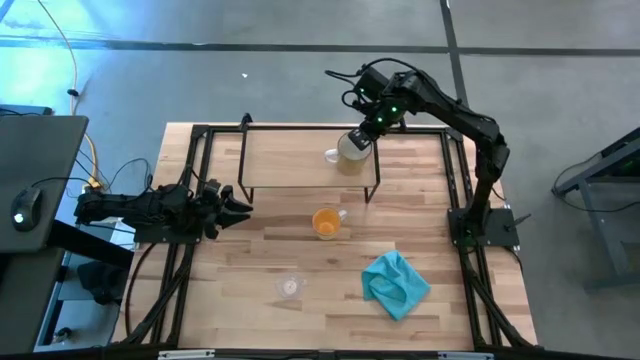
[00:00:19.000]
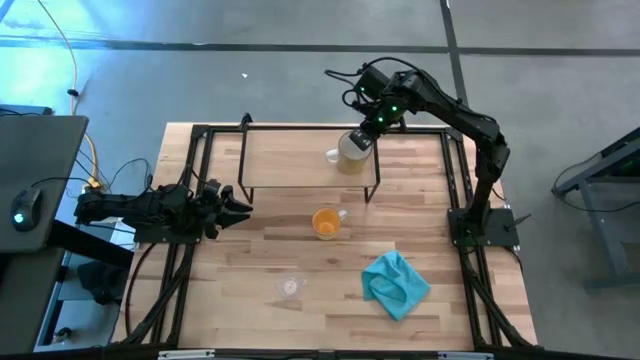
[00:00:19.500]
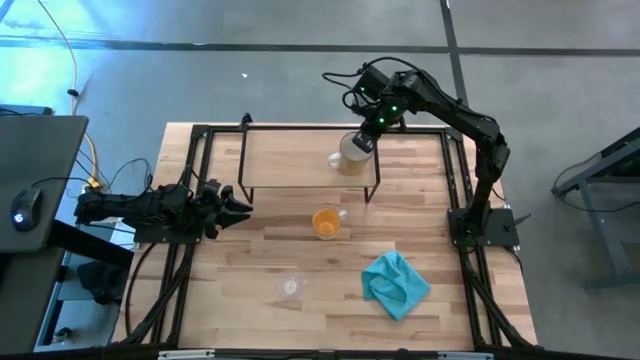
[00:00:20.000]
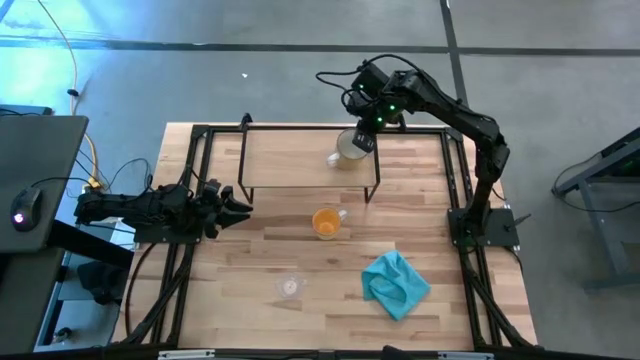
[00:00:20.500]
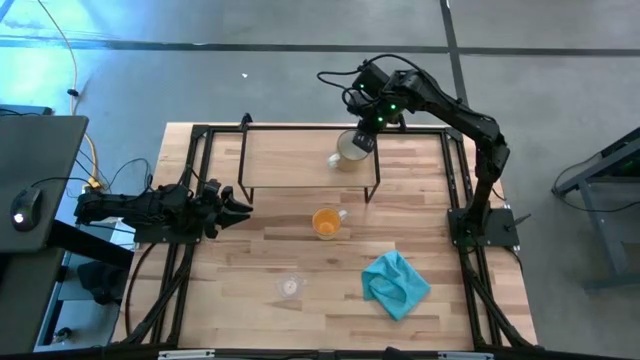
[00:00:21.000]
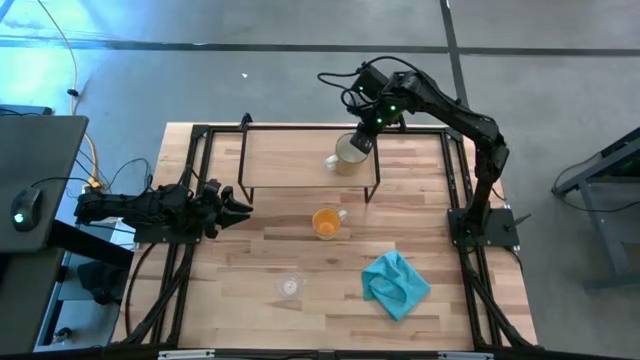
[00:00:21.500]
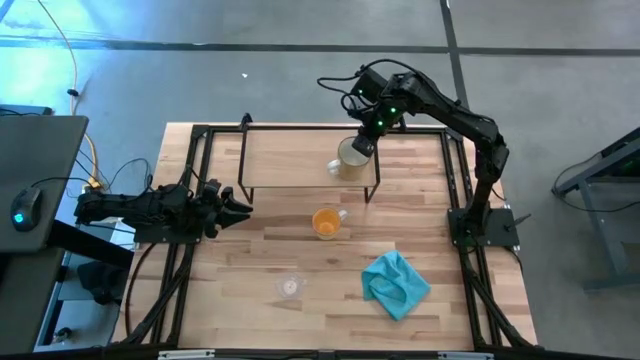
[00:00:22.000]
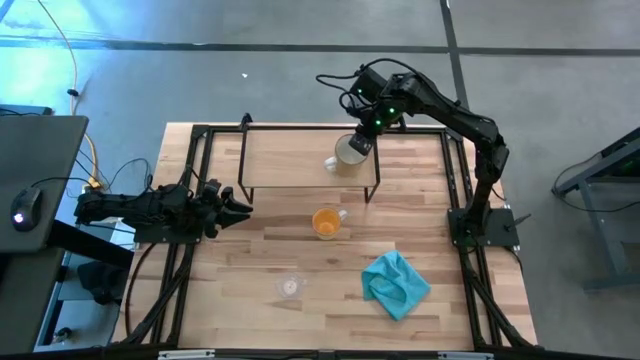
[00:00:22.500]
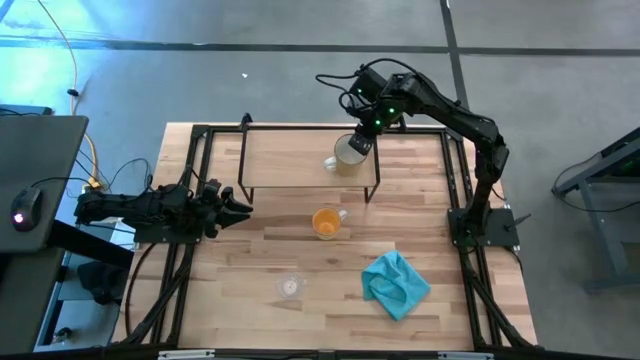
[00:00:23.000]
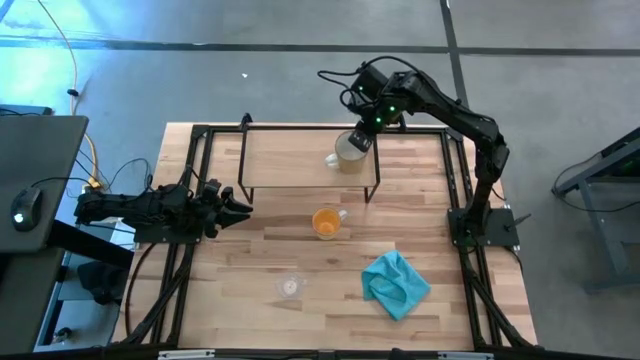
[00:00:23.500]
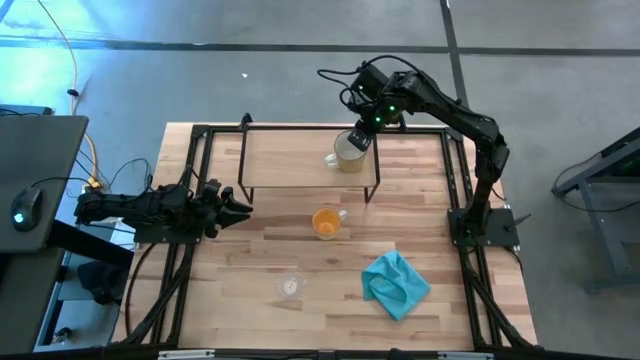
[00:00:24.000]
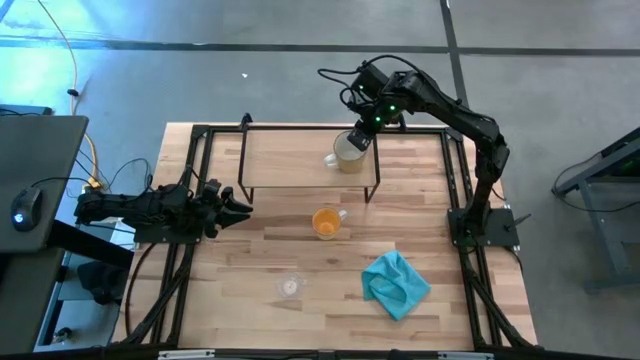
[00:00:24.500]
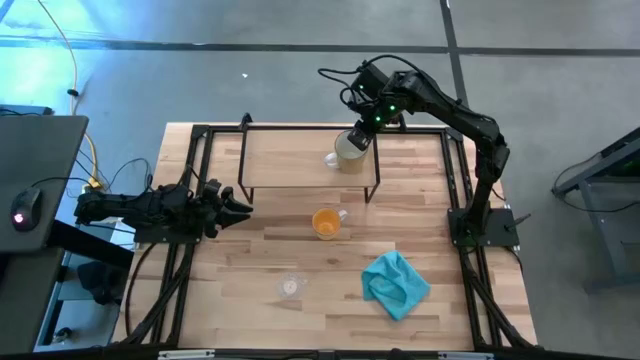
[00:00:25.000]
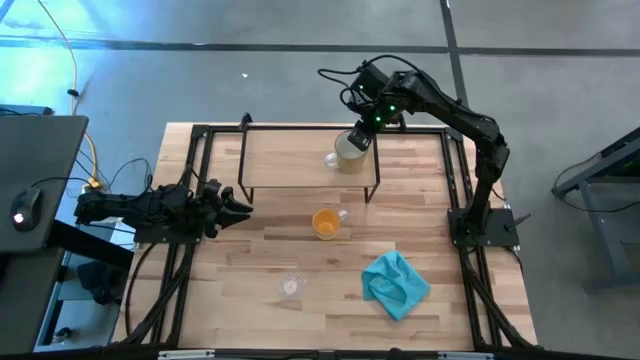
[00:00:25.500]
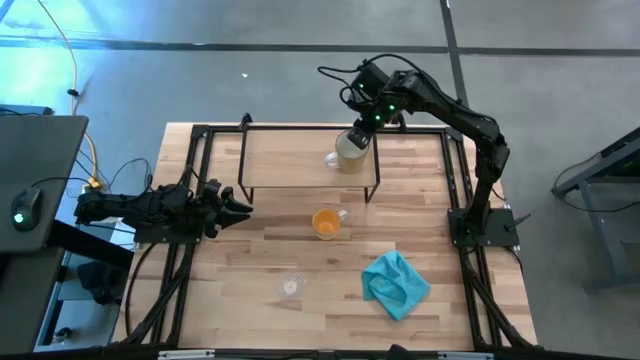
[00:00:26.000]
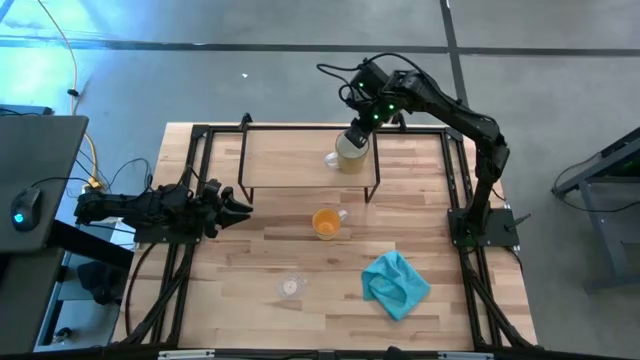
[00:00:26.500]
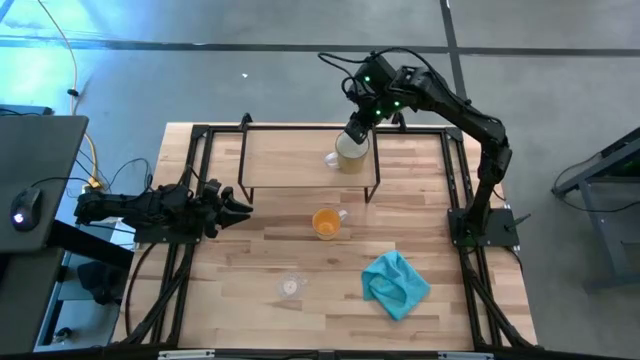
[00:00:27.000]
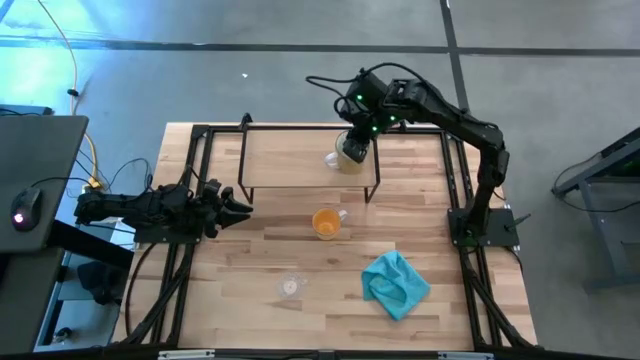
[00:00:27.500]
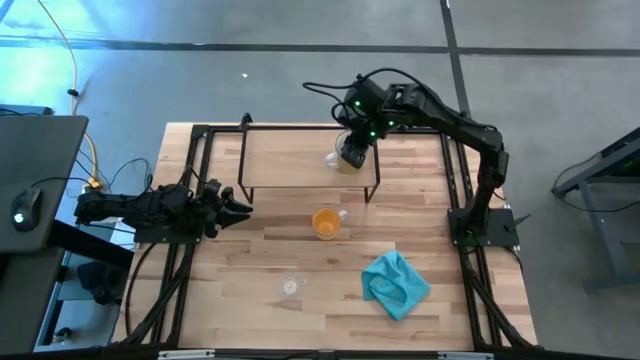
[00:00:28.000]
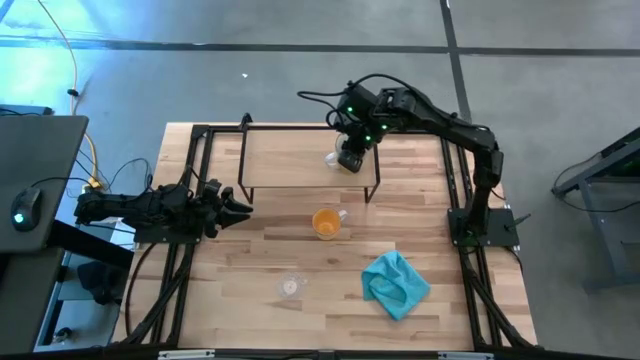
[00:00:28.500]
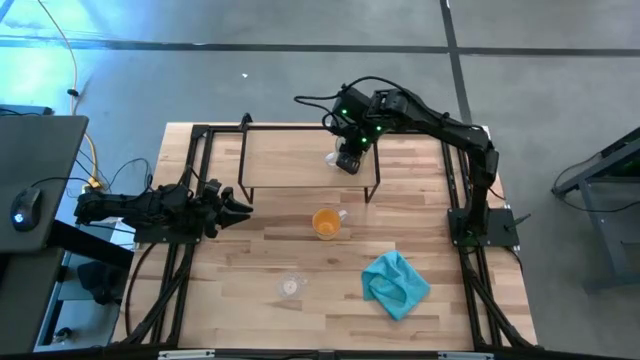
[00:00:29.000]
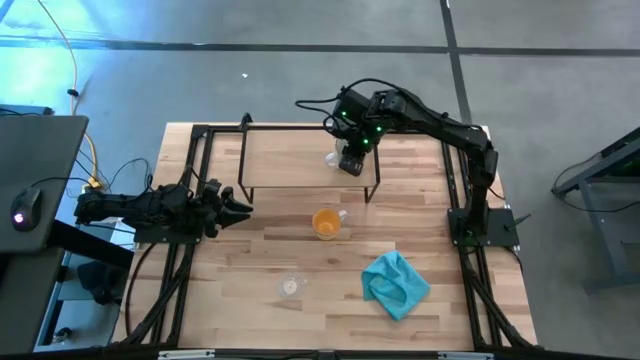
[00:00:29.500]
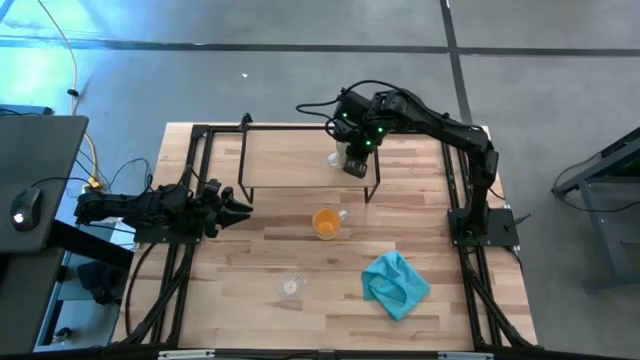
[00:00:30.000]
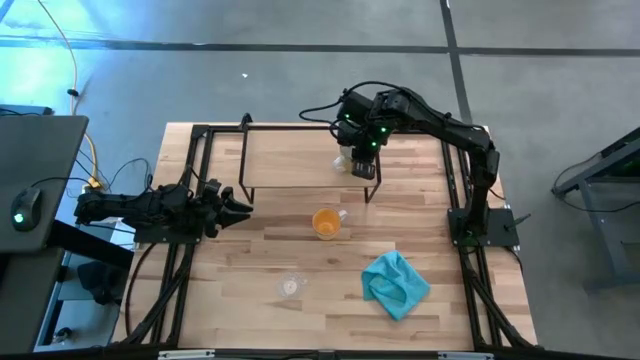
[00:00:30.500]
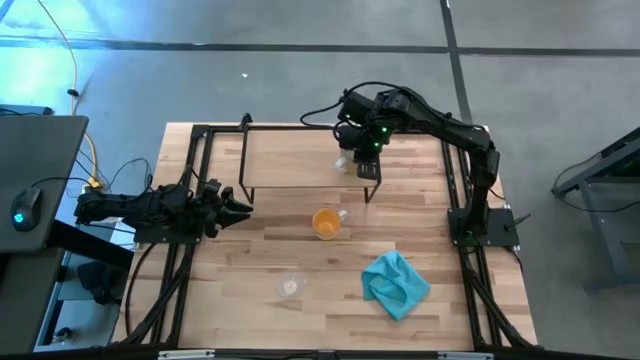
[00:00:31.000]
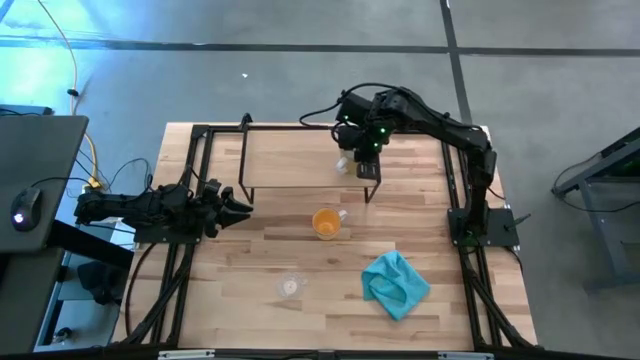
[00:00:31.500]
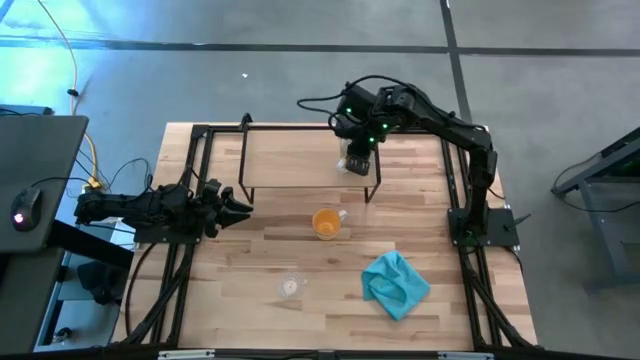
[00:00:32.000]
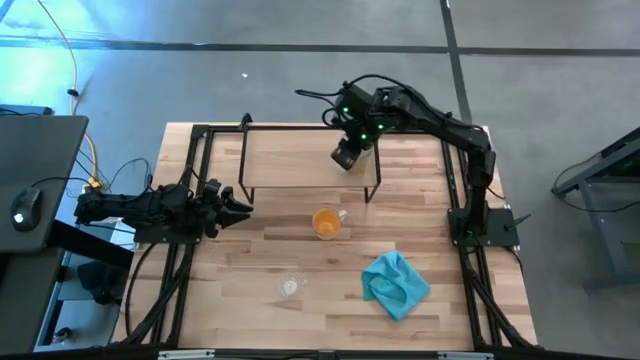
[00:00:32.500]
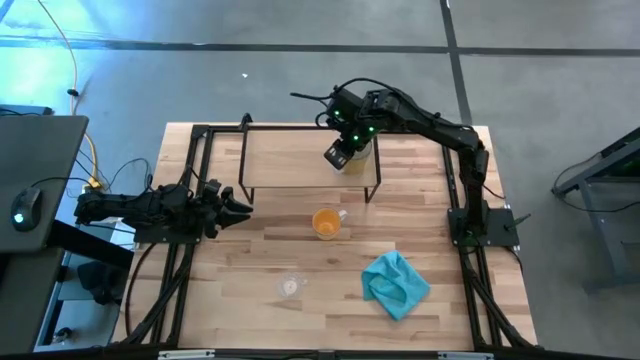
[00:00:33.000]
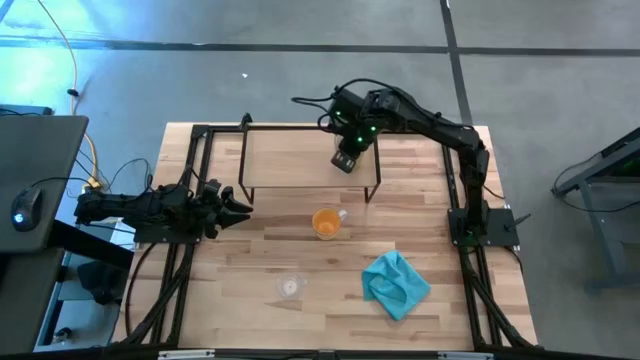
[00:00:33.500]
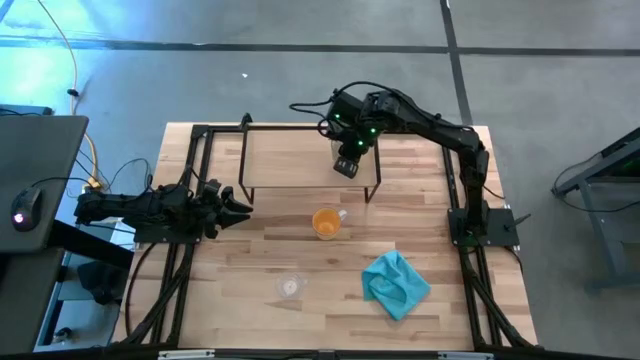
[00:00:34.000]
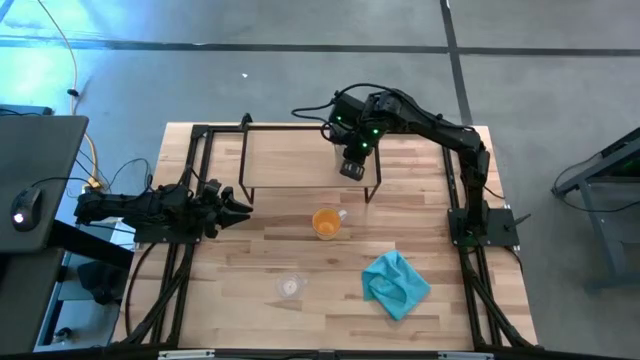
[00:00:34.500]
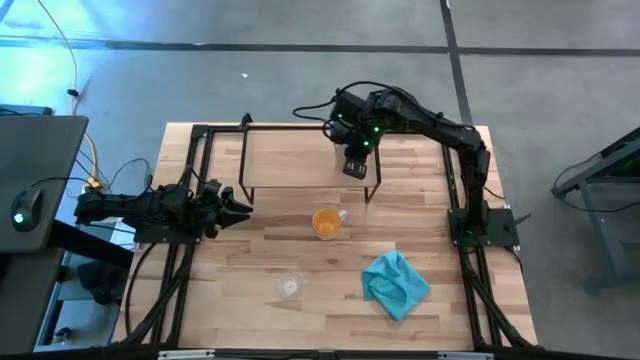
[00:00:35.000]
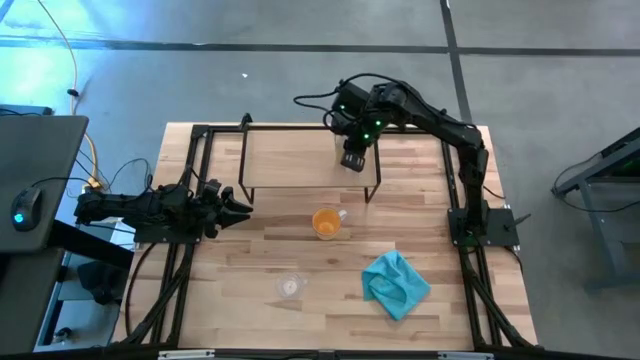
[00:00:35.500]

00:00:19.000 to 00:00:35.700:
Task: Stack small to large cups/mugs on shelf
Put the white mug on the shelf
